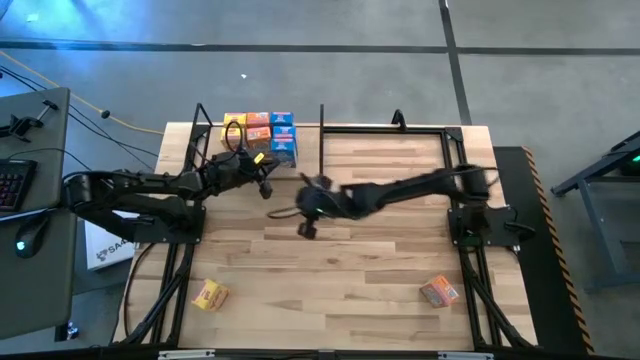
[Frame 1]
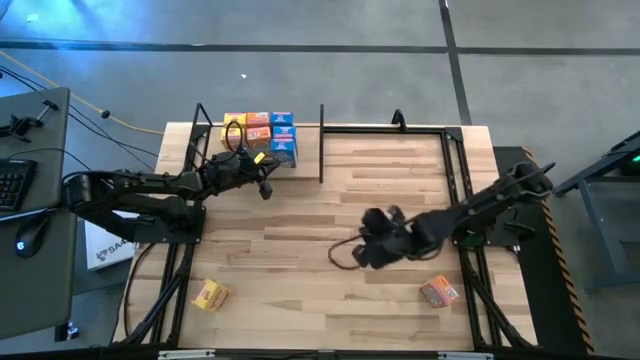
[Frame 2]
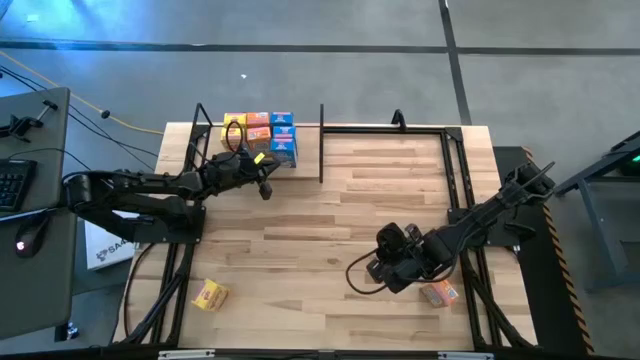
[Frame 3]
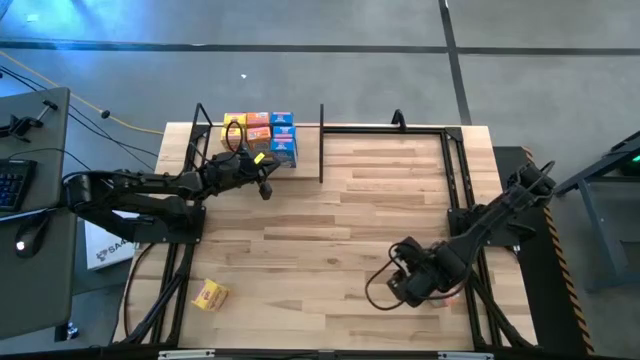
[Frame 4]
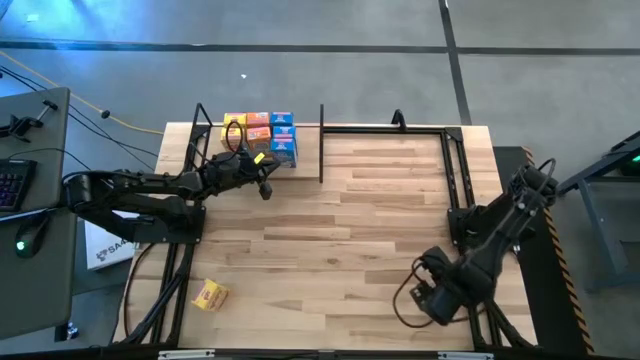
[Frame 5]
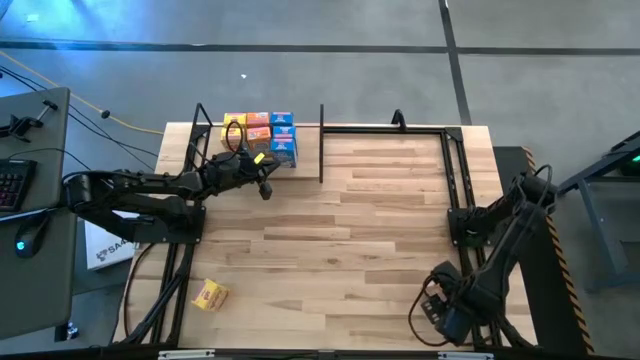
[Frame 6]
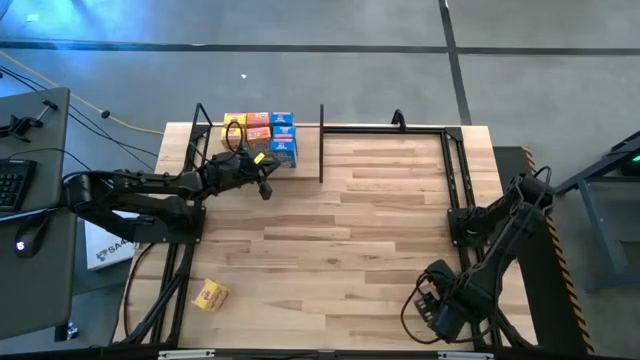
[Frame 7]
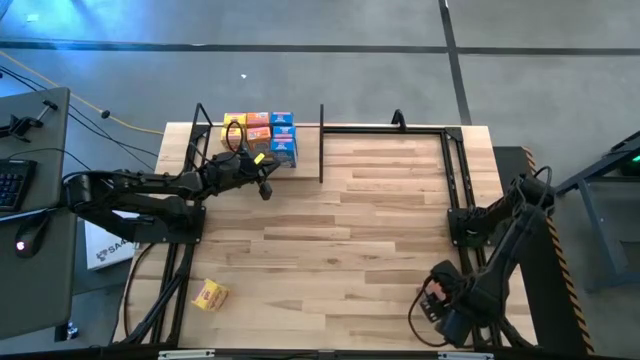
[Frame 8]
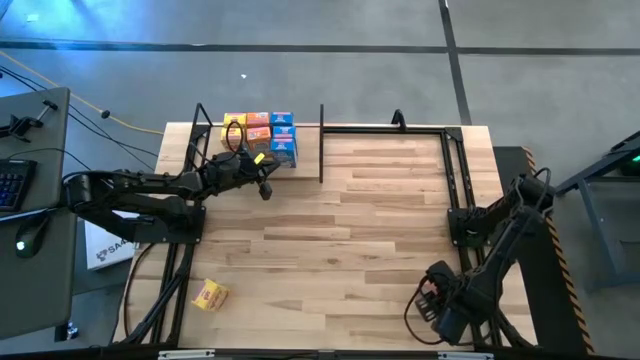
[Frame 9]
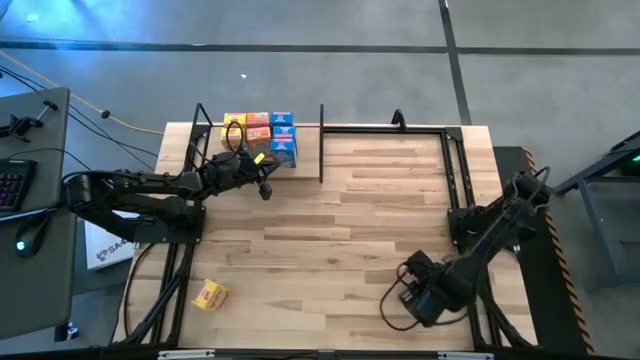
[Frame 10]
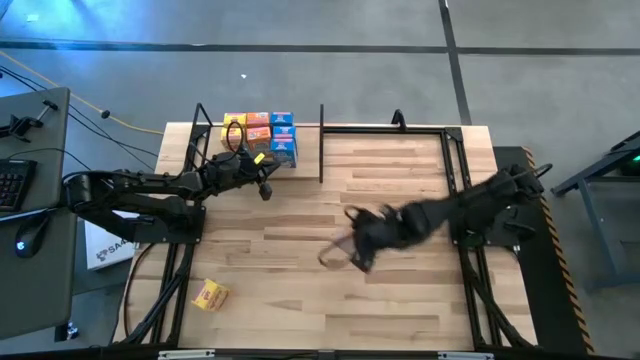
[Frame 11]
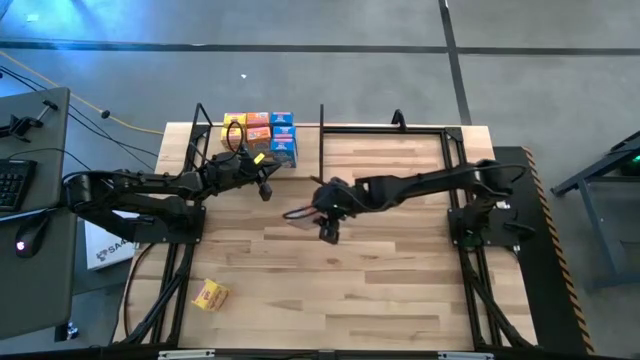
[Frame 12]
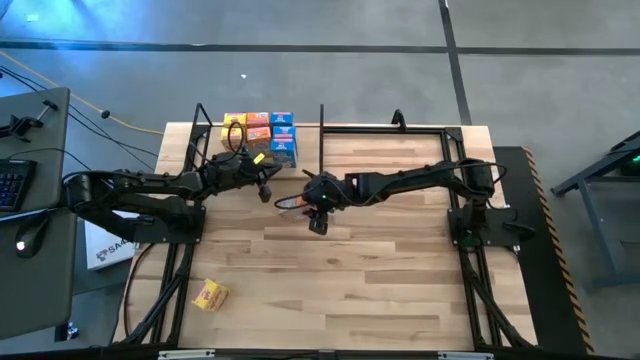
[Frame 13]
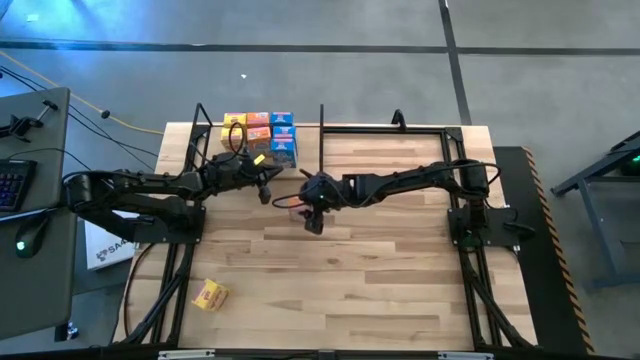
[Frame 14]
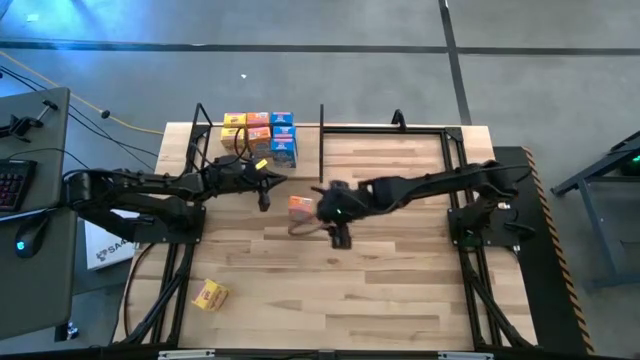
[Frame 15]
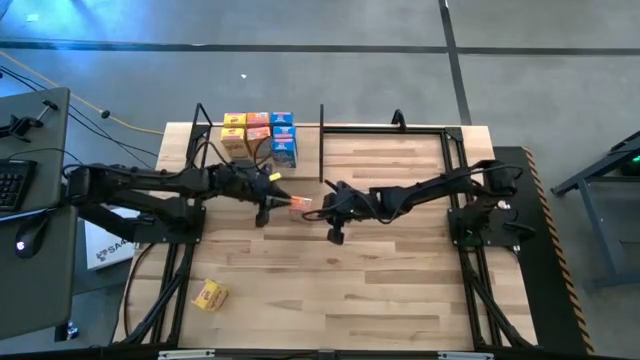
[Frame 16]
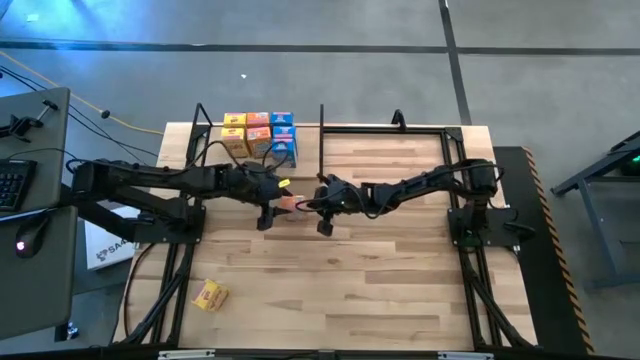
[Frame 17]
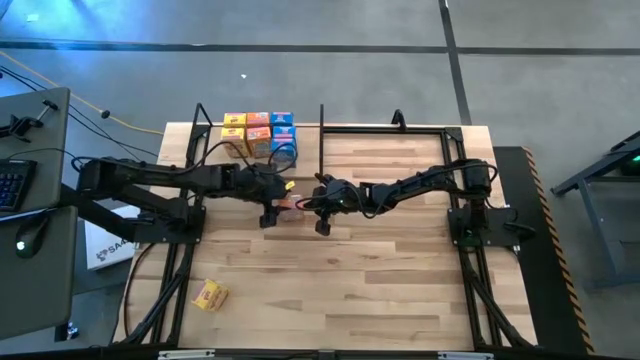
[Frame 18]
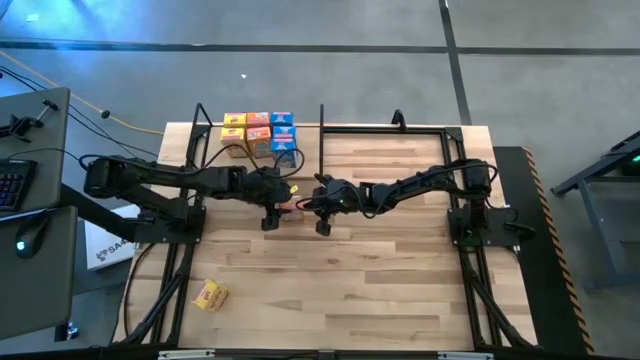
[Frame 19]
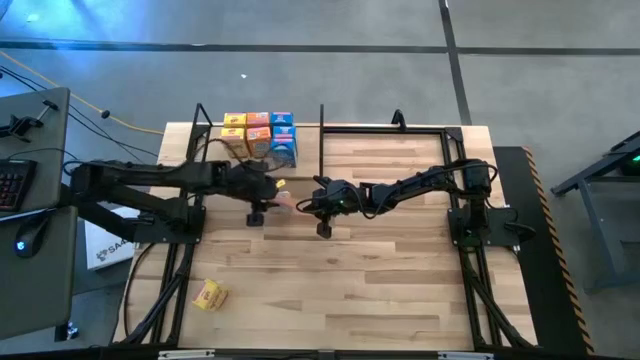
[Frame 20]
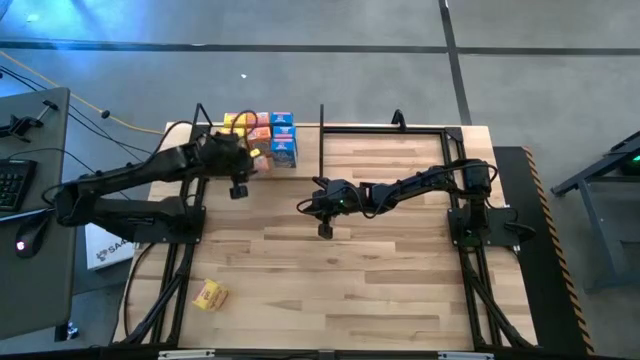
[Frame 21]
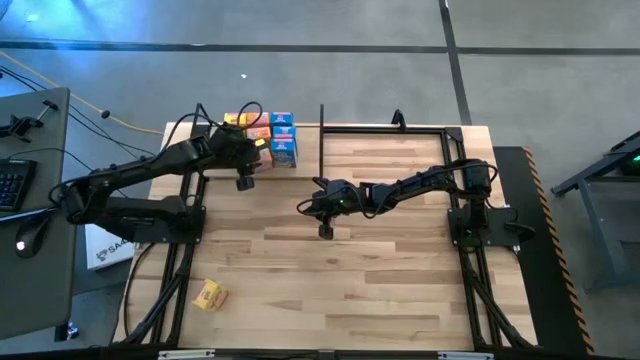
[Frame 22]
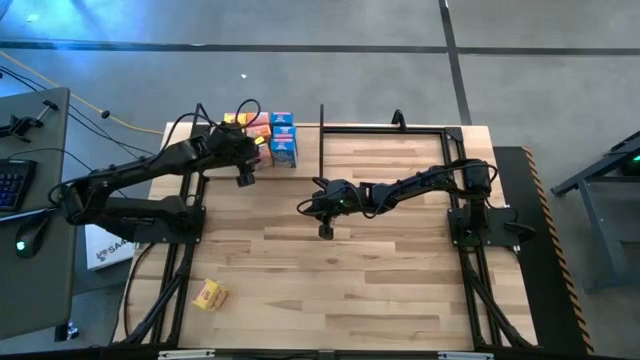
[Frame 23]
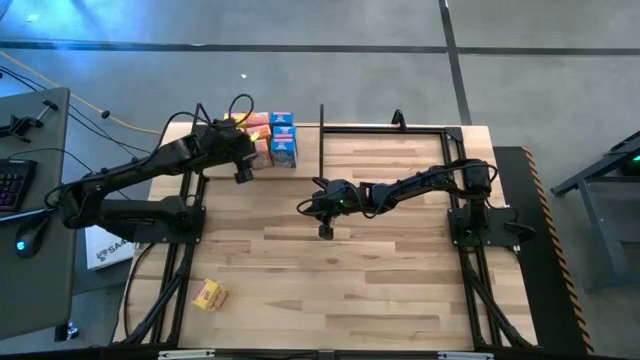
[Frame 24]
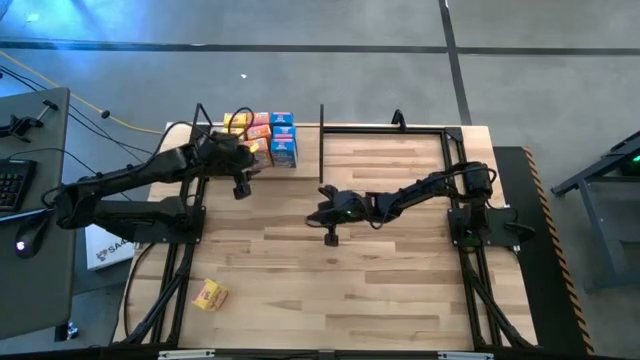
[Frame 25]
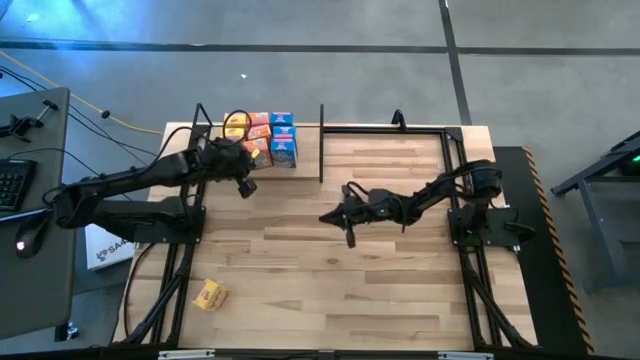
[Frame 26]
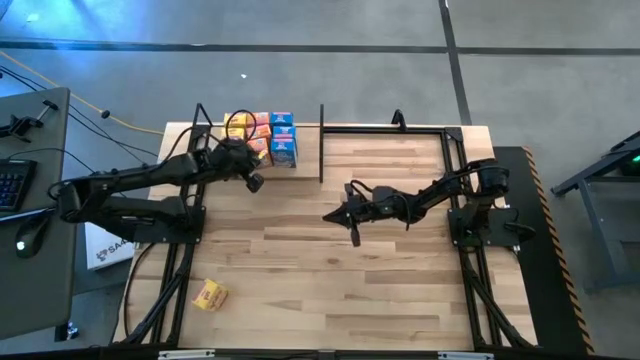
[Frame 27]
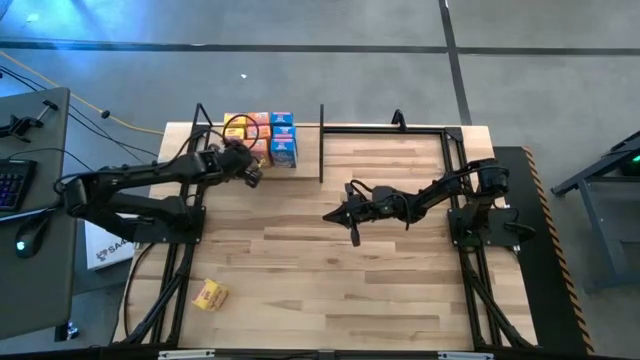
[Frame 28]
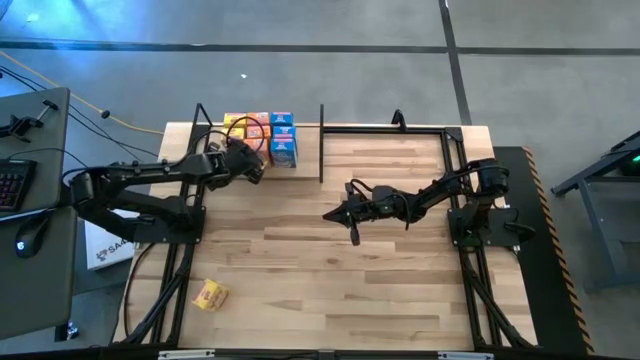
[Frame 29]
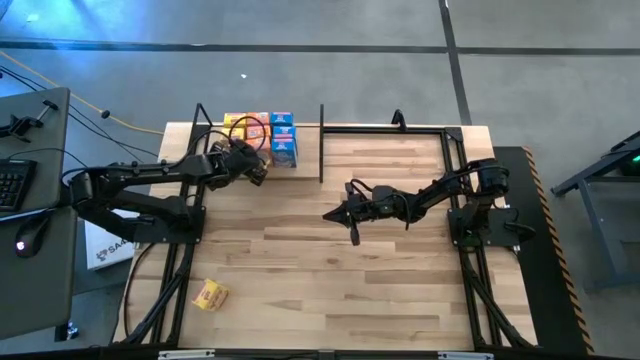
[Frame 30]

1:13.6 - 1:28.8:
Task: Stack cereal on shelf
Put the orange cereal box on the shelf aligned with the other orange cereal boxes

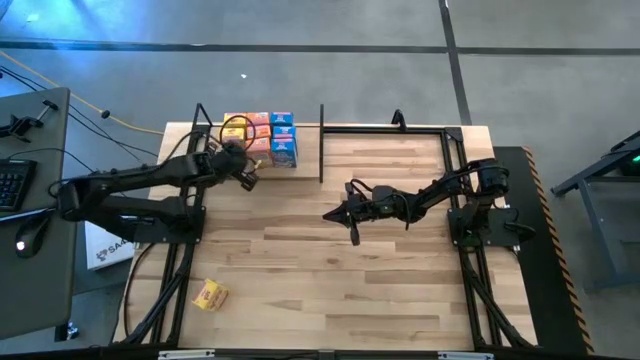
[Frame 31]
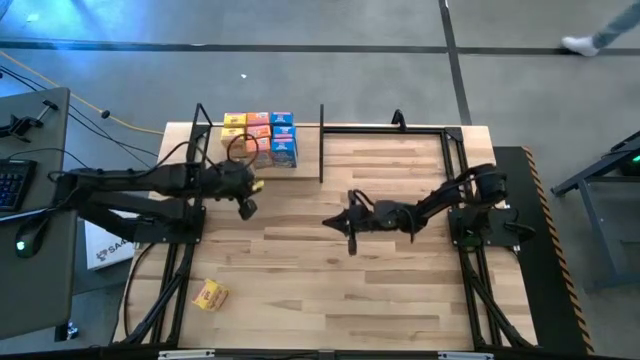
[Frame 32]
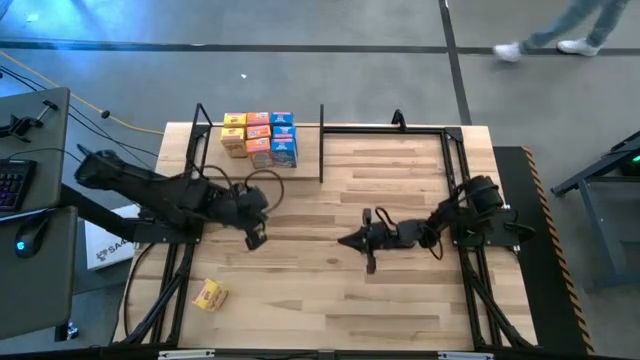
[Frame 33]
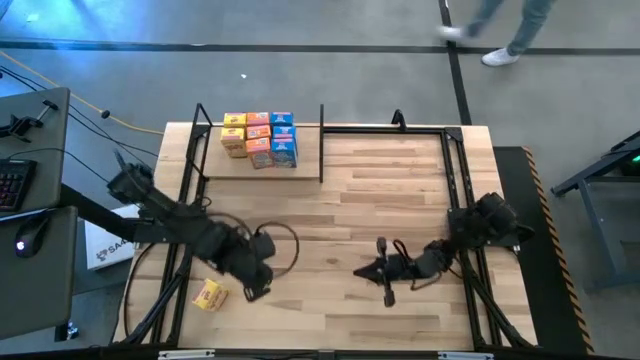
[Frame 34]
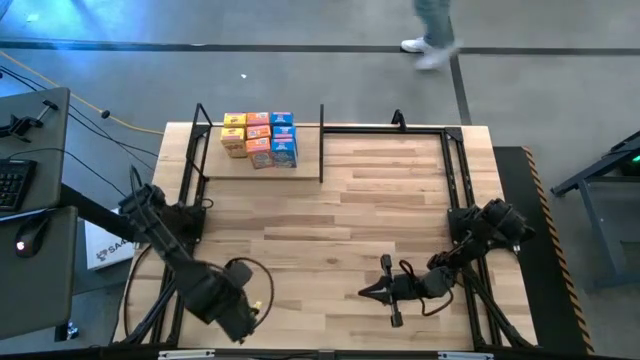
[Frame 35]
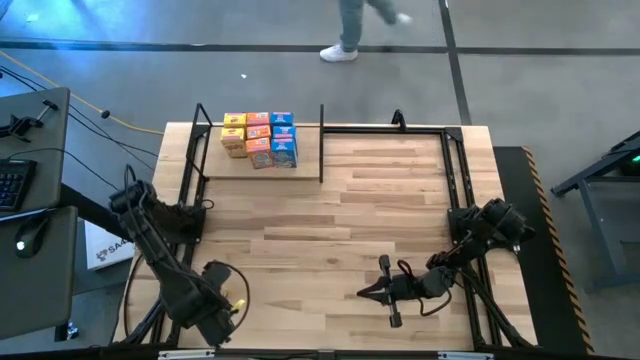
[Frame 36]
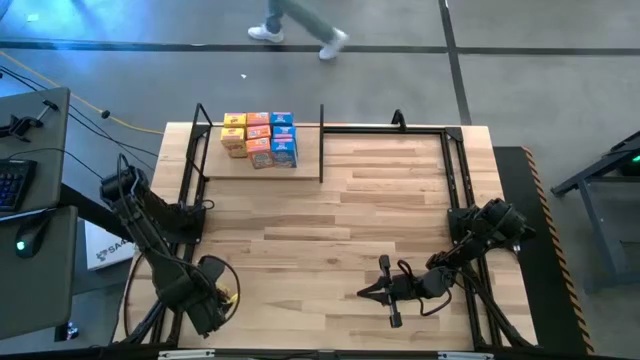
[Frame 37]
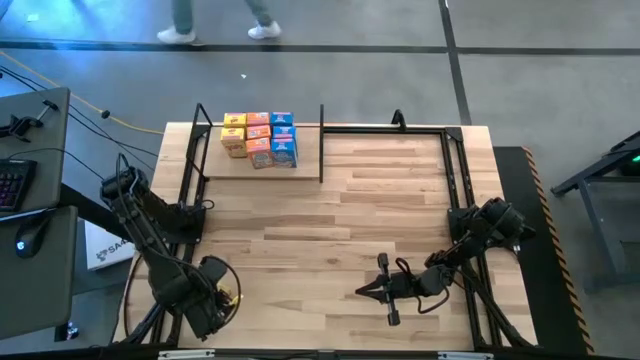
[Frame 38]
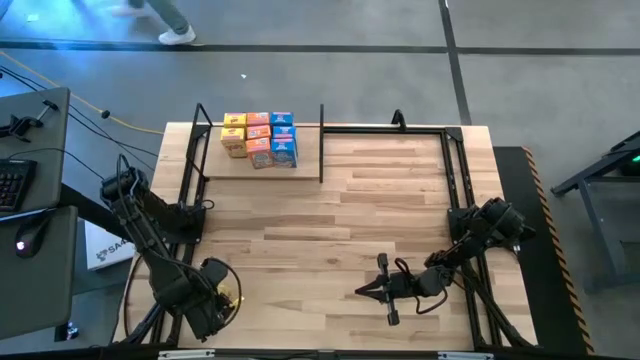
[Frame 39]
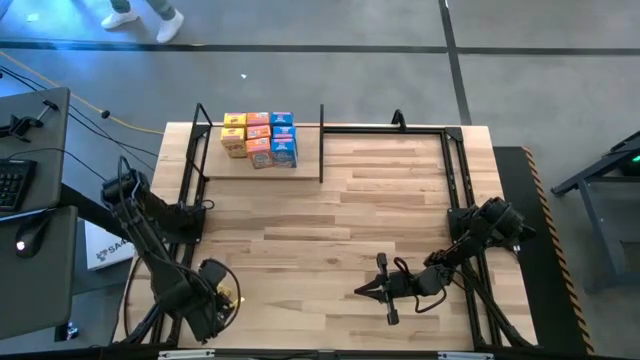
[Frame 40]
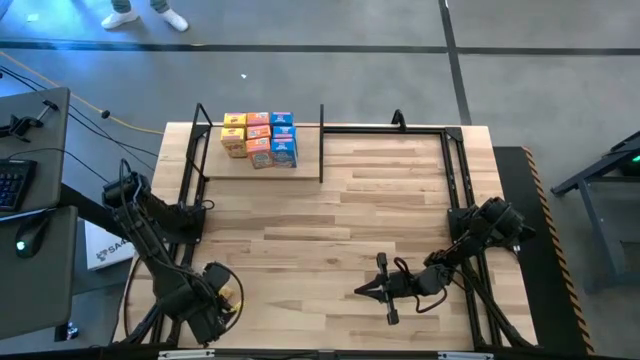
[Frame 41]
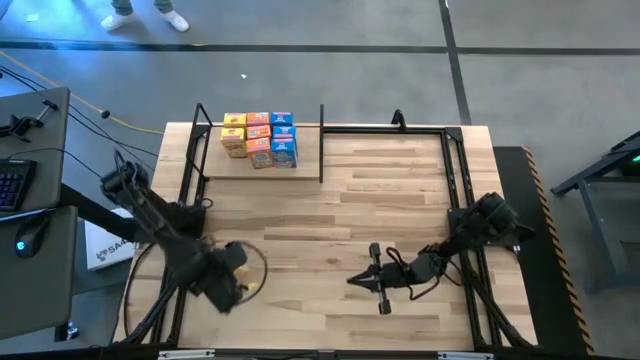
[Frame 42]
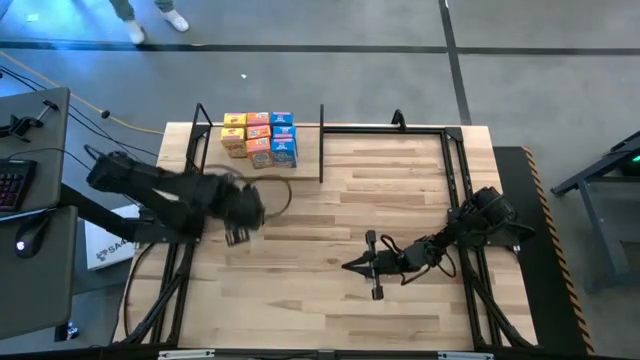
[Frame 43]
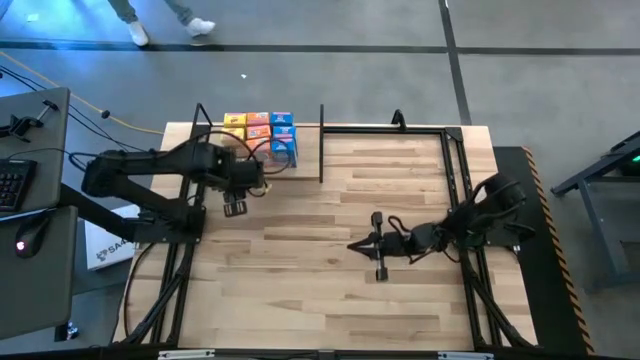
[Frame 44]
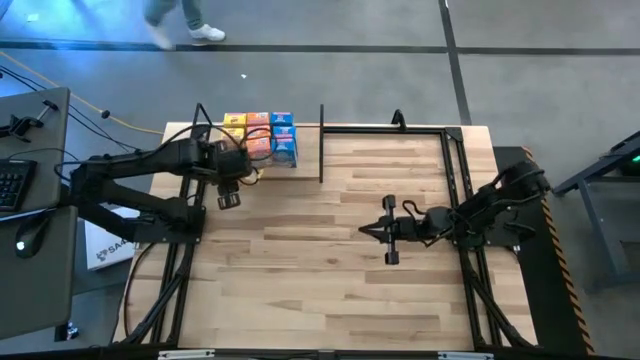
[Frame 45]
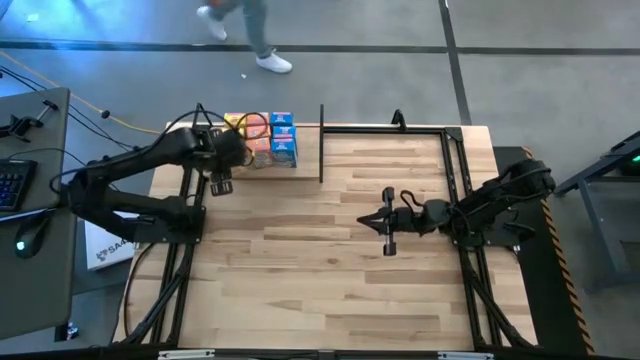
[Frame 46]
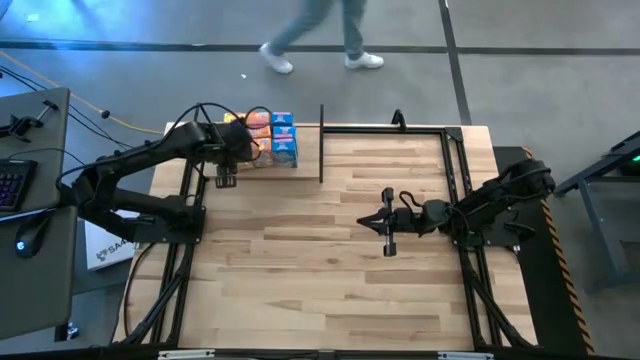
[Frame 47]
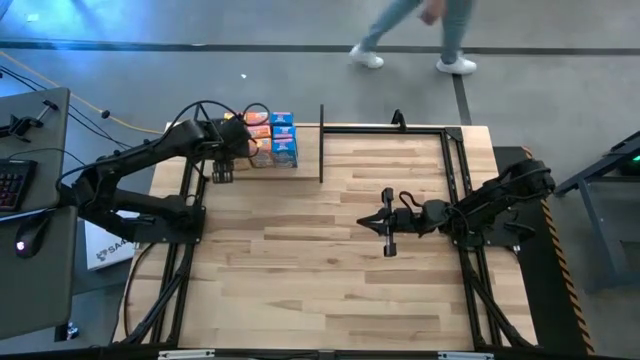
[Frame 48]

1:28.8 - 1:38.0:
Put the yellow cereal box on the shelf aligned with the other yellow cereal box
